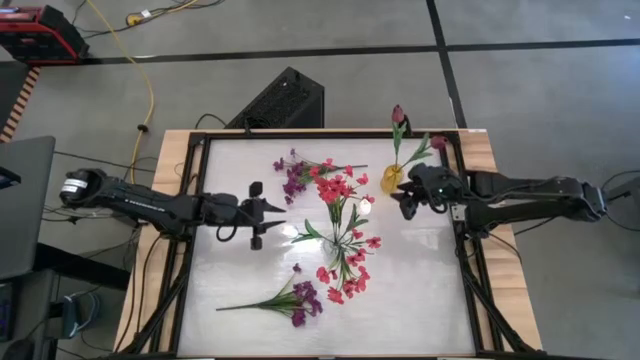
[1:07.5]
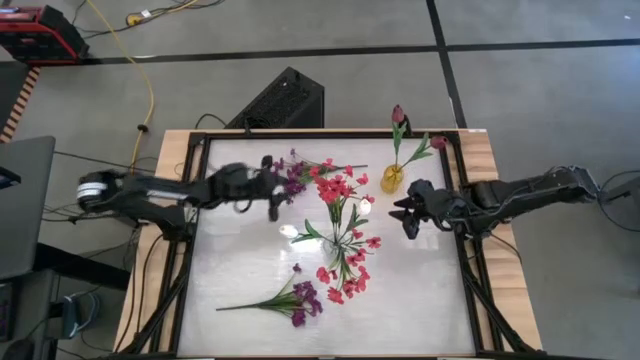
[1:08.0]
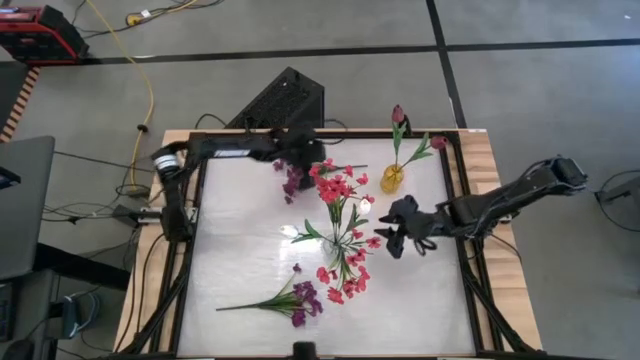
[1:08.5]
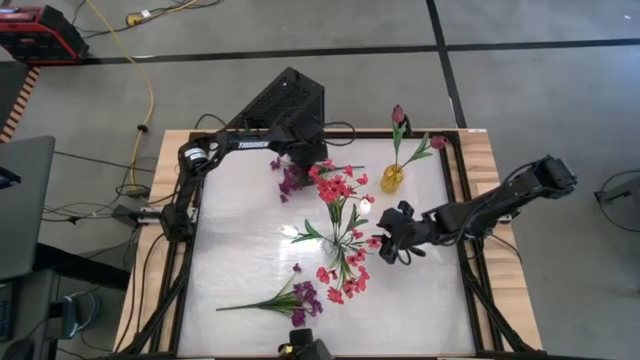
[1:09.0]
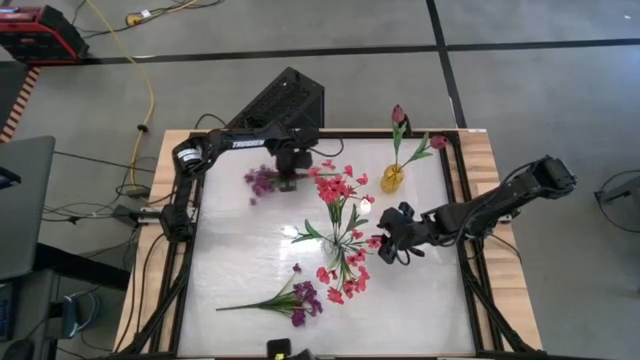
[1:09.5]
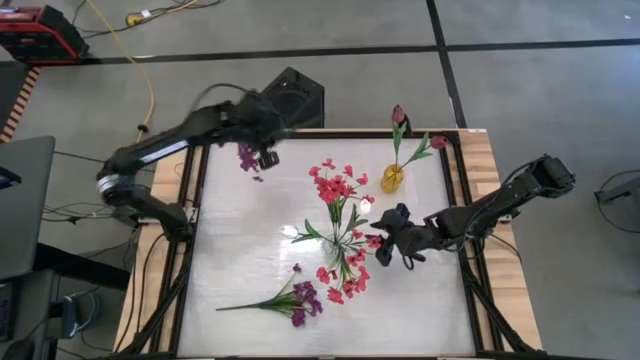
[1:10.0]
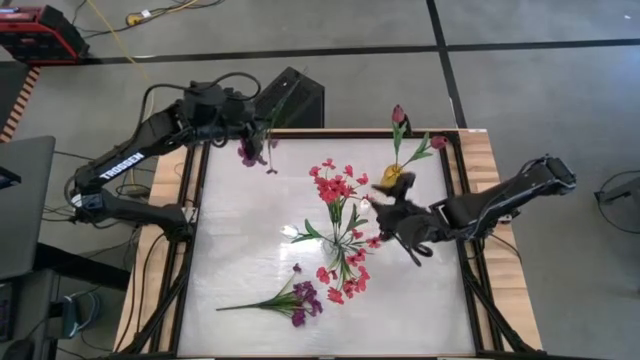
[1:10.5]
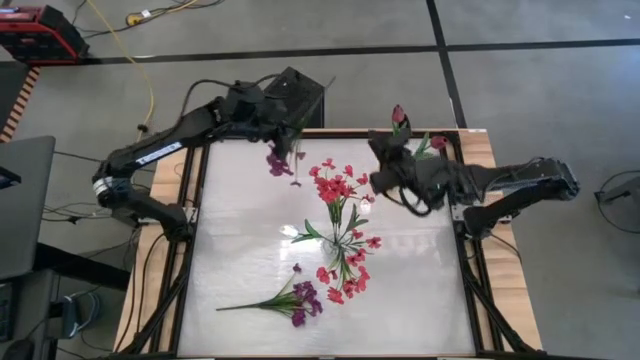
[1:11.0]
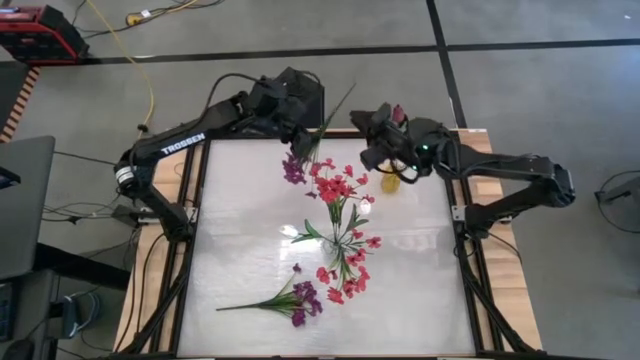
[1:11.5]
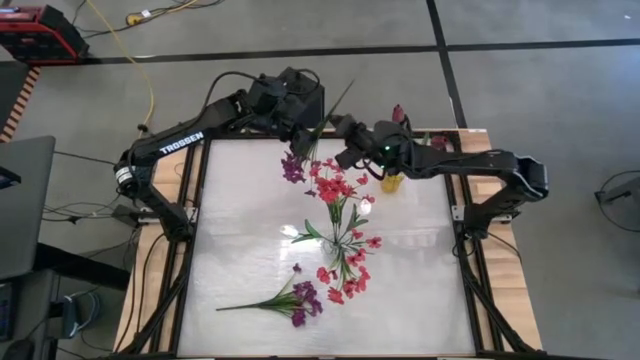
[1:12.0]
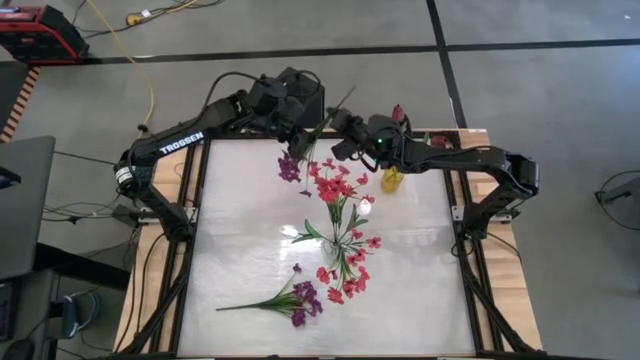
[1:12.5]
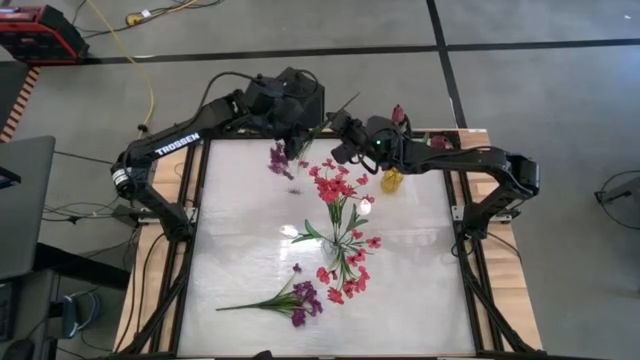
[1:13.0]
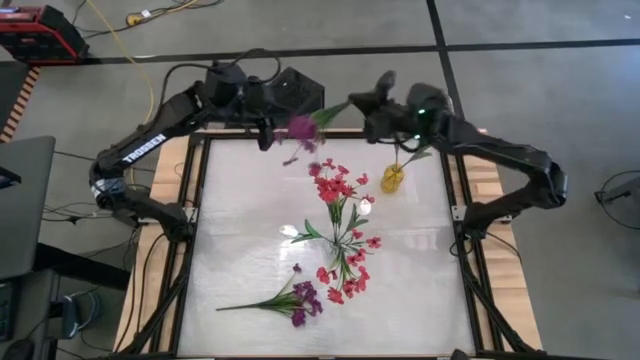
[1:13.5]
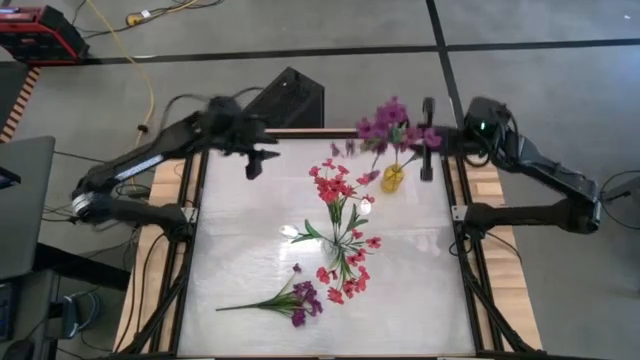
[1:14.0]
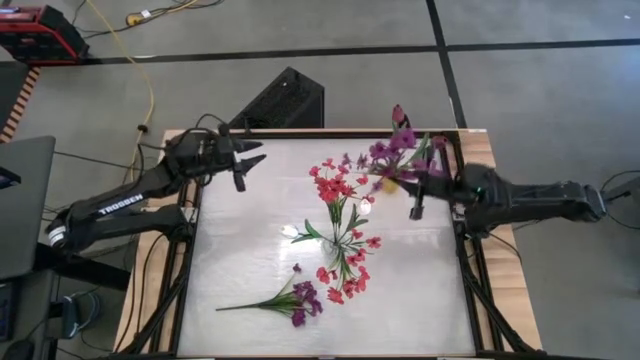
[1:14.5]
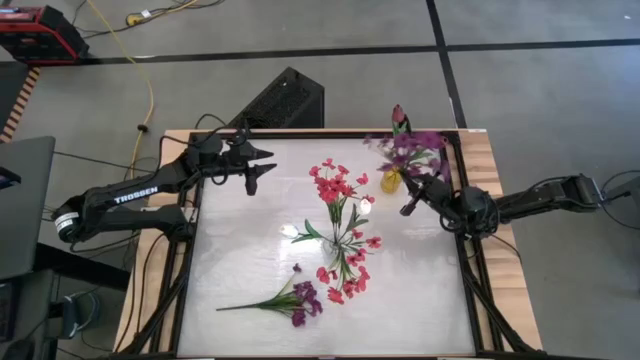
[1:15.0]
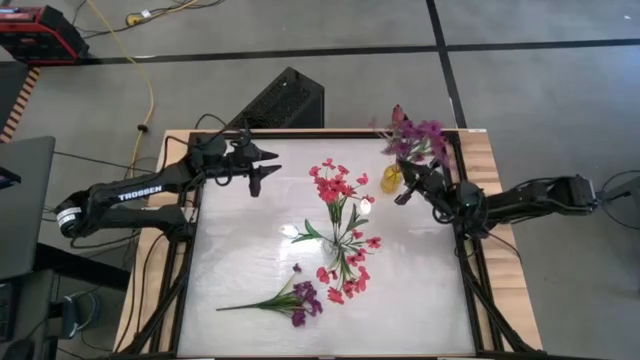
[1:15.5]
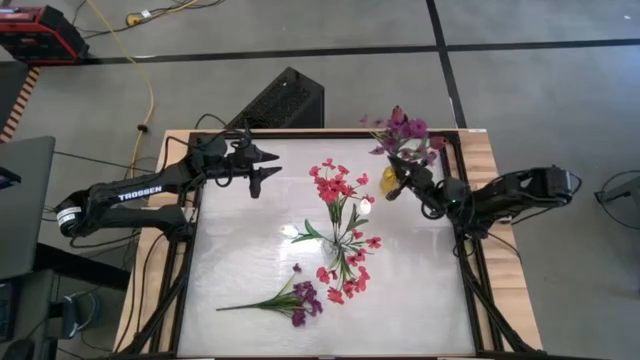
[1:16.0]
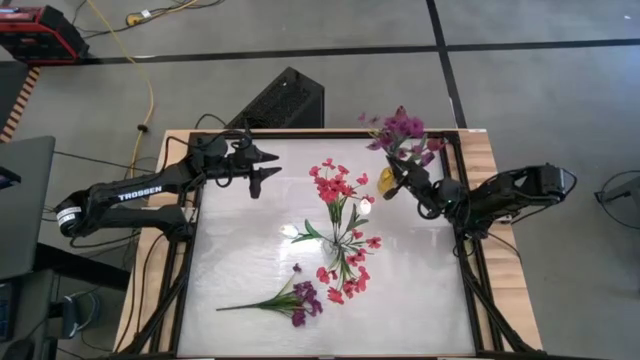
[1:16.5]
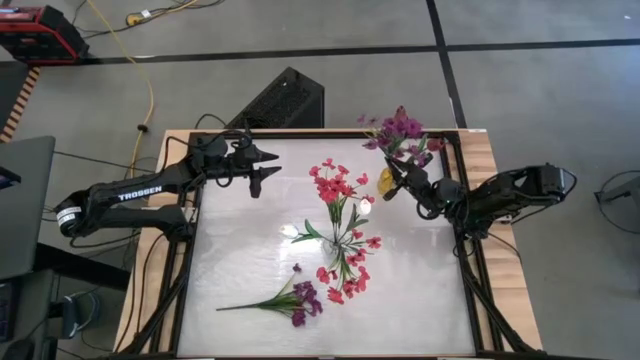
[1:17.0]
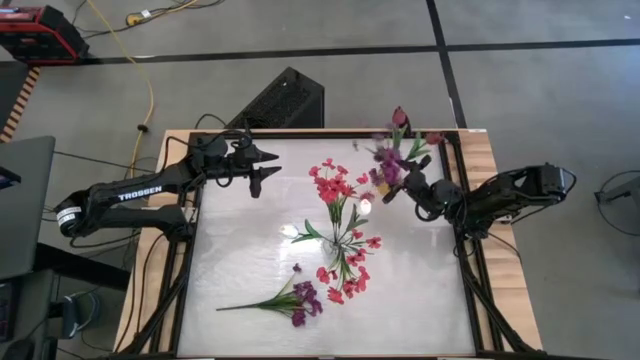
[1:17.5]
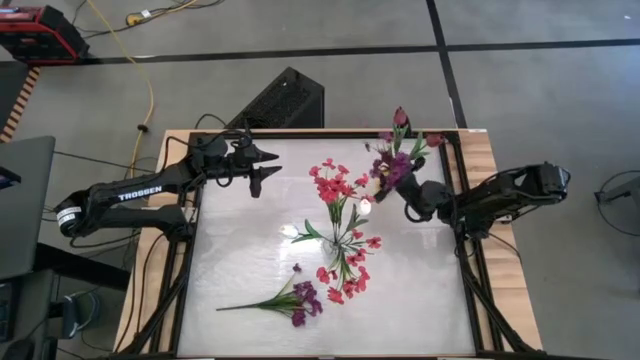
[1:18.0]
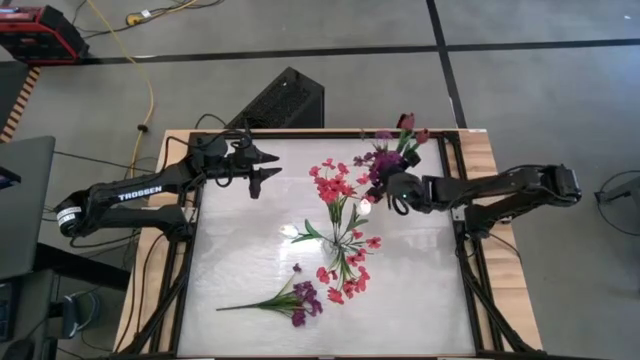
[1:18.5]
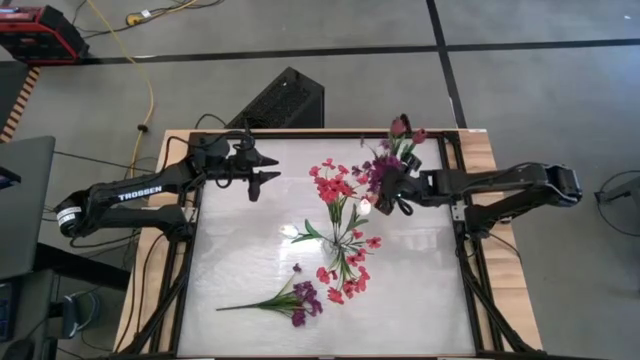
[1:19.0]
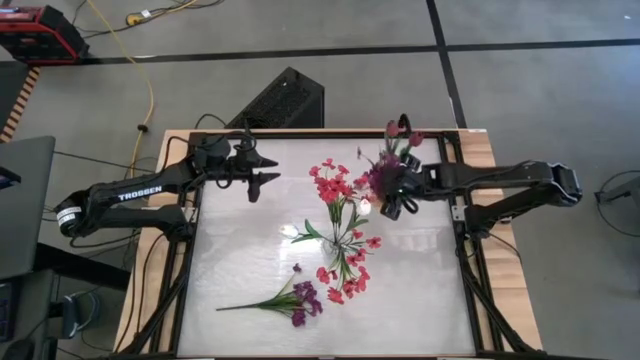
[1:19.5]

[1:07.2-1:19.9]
Task: Sort flowers into vase by color
Put the top purple flowers into the yellow vase

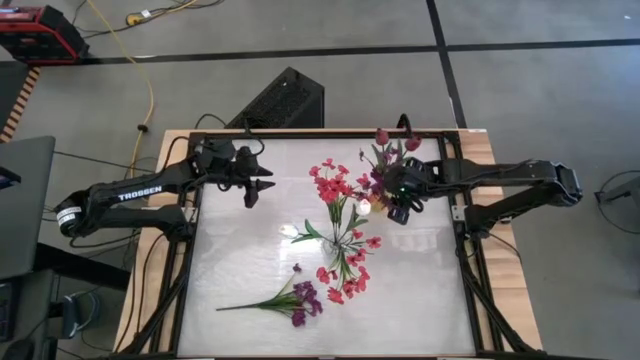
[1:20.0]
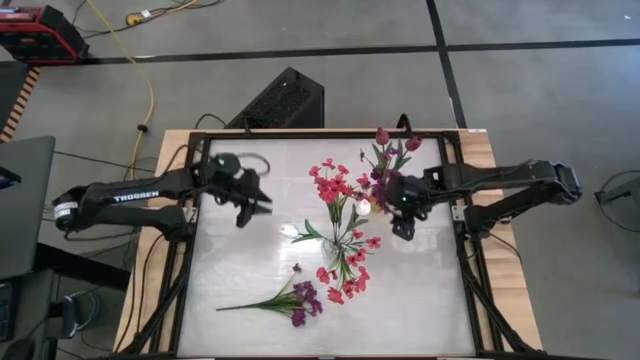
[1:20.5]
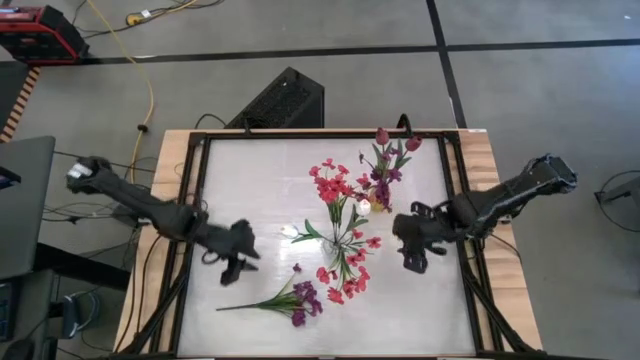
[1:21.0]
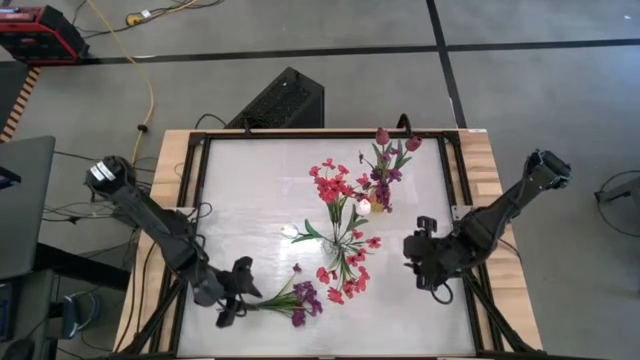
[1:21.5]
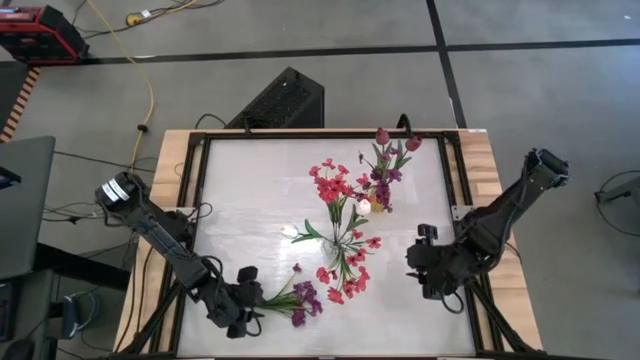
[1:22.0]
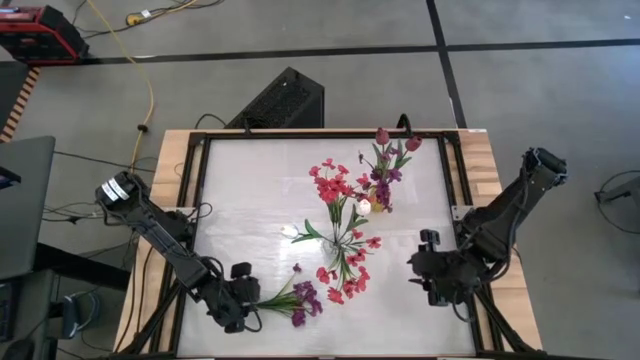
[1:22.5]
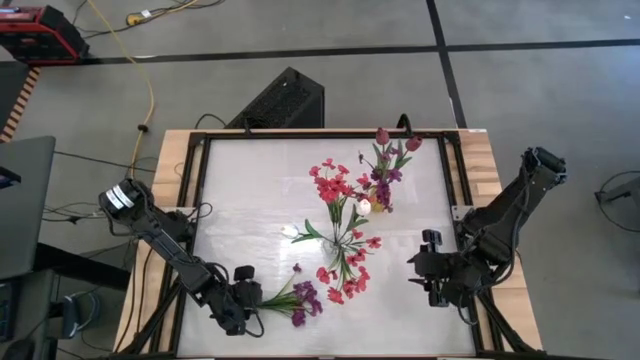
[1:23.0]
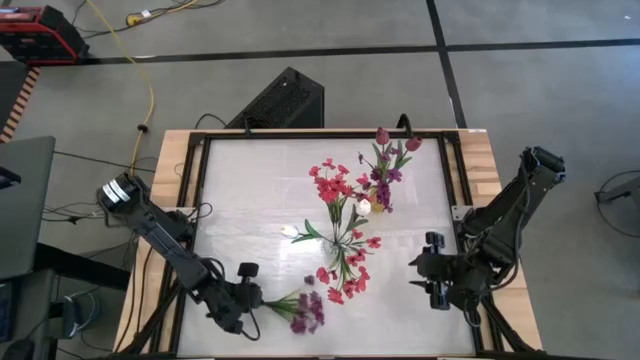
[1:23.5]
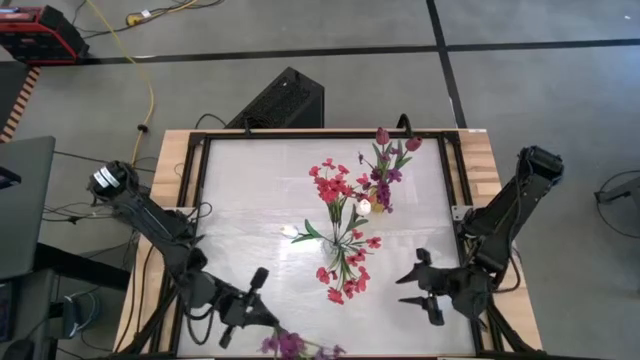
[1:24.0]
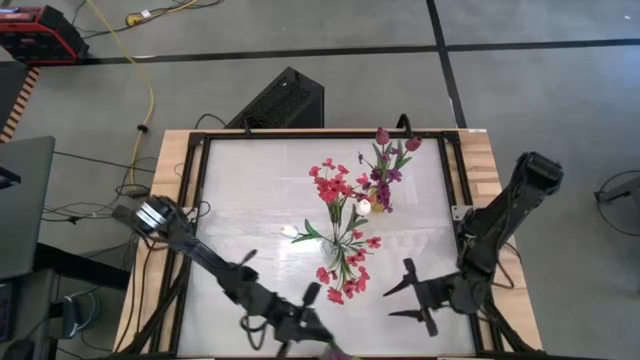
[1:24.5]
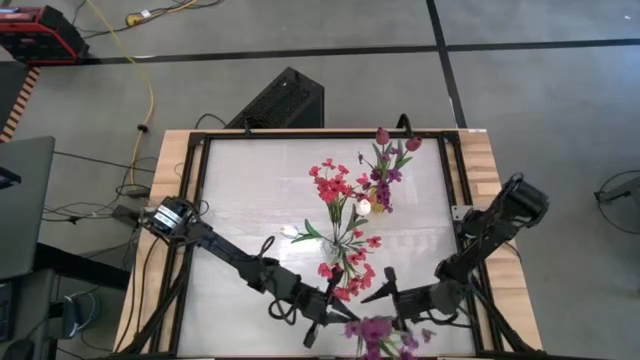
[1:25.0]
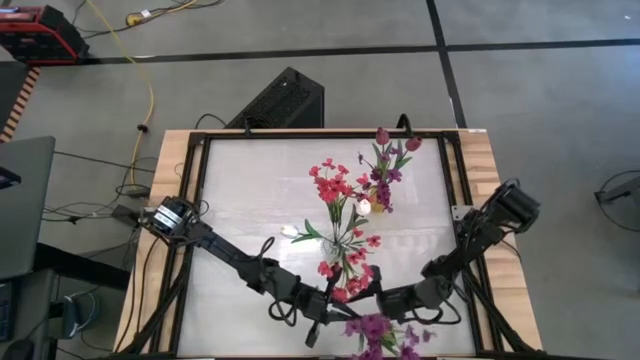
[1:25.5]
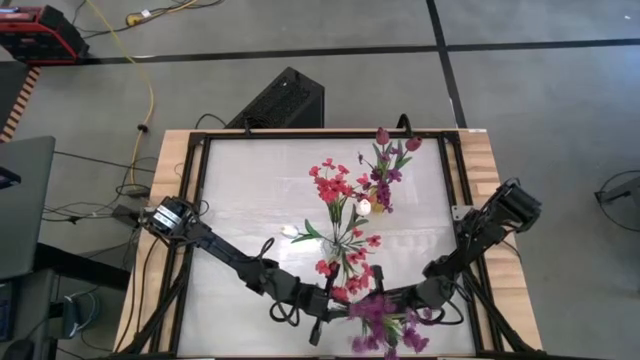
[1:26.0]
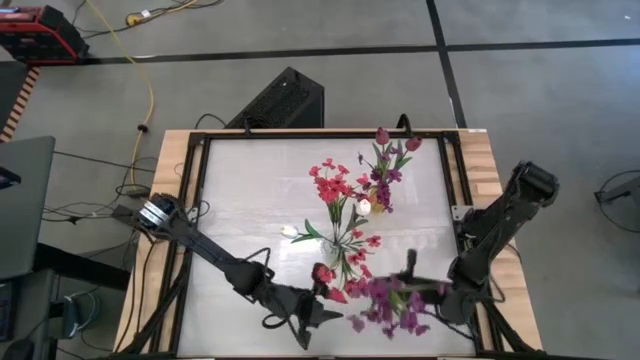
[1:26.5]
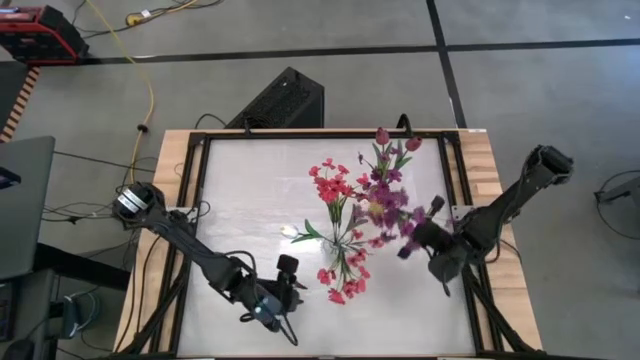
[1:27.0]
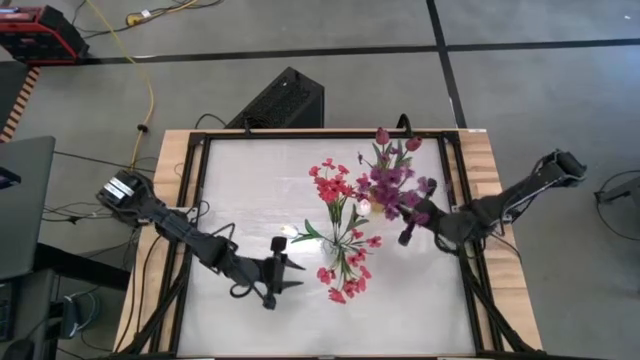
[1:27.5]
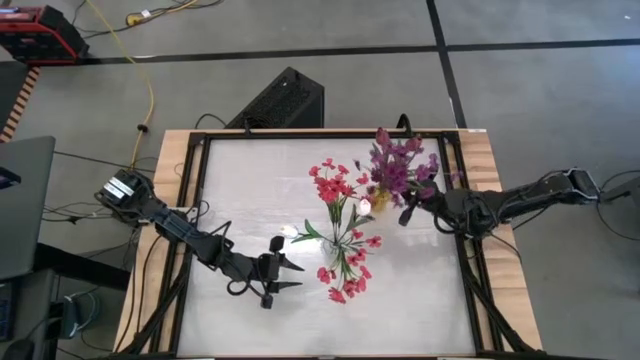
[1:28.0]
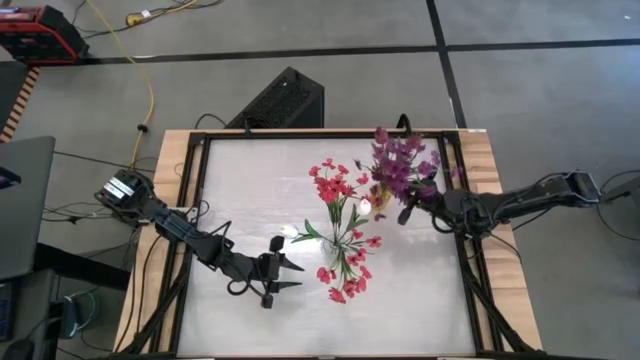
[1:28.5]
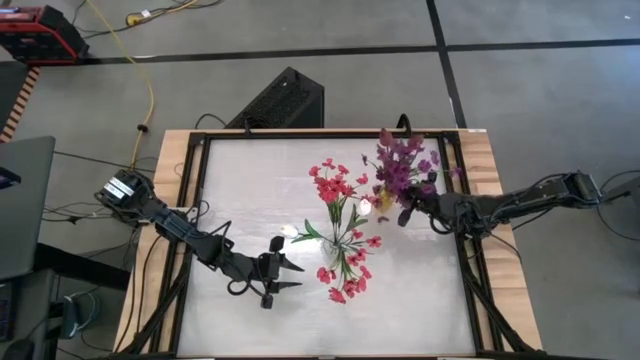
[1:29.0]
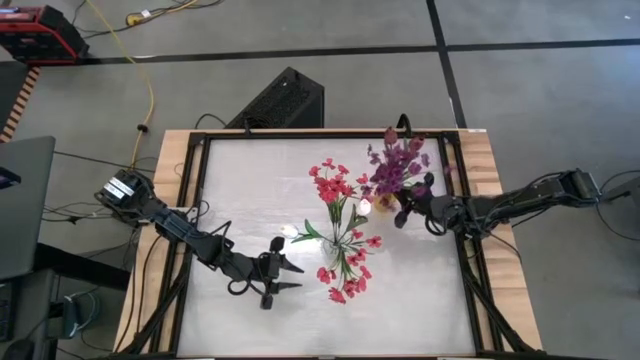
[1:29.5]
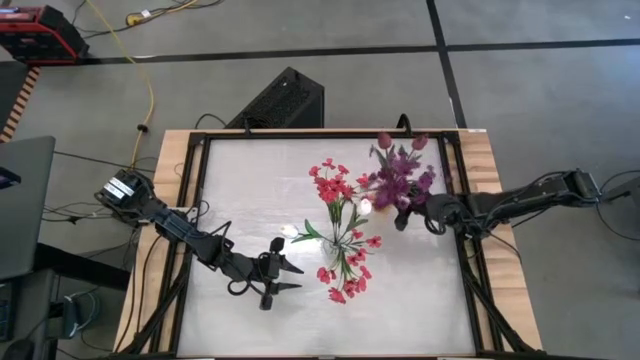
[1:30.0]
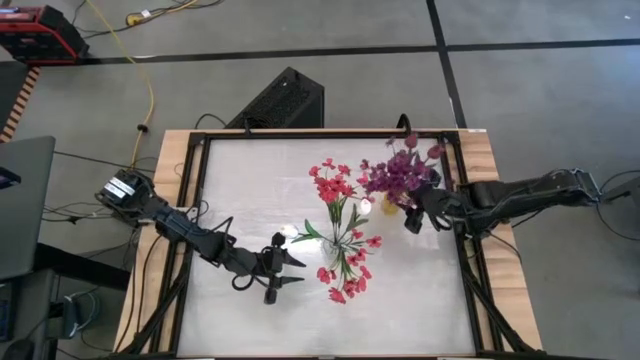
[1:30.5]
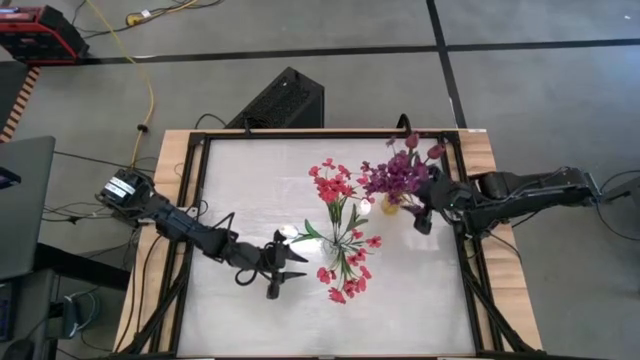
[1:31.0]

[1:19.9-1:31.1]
Put the purple flowers into the yellow vase
